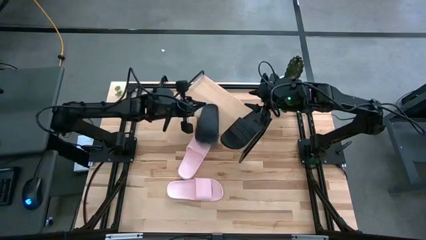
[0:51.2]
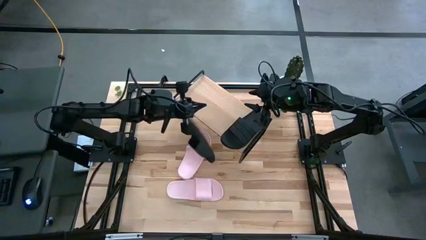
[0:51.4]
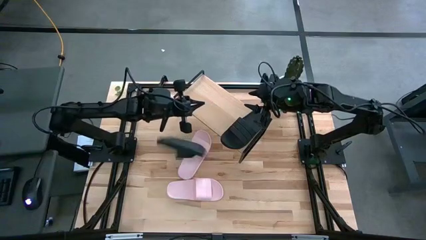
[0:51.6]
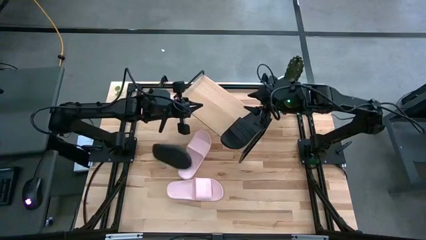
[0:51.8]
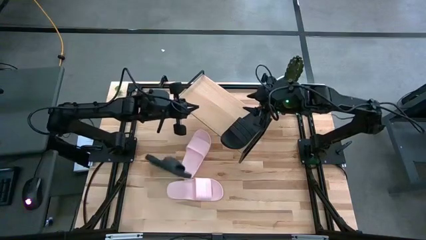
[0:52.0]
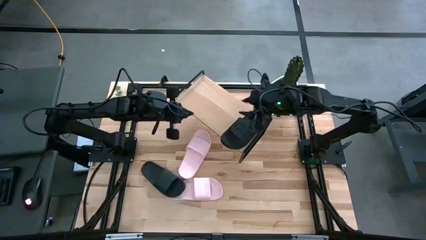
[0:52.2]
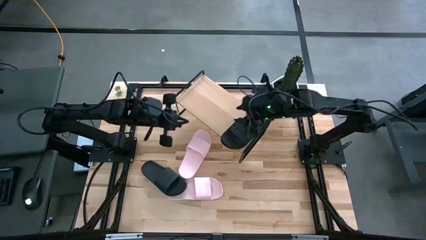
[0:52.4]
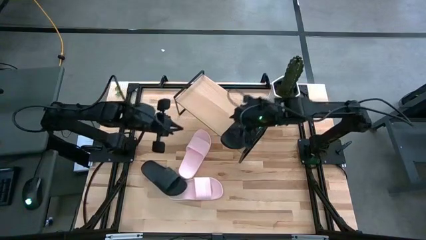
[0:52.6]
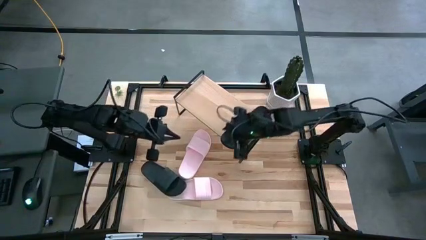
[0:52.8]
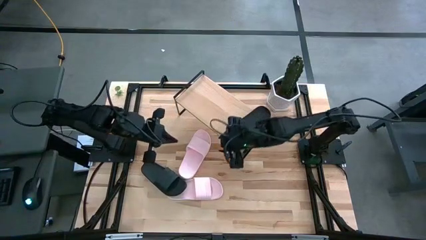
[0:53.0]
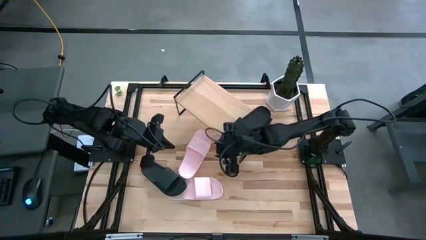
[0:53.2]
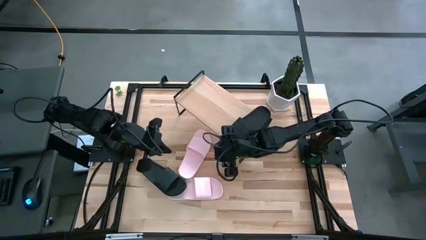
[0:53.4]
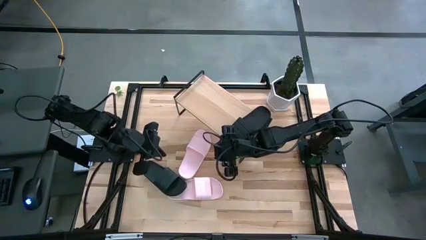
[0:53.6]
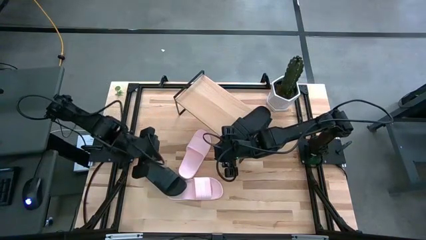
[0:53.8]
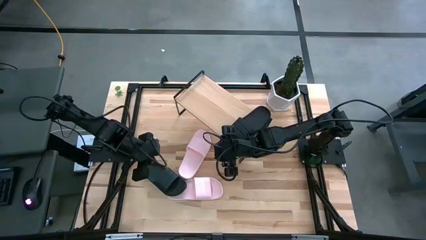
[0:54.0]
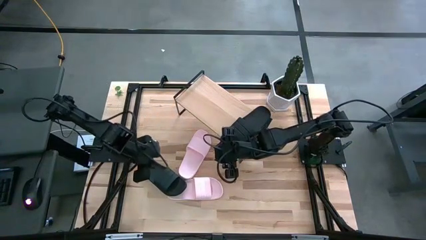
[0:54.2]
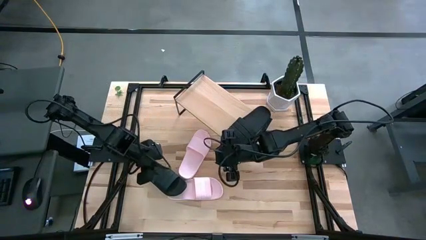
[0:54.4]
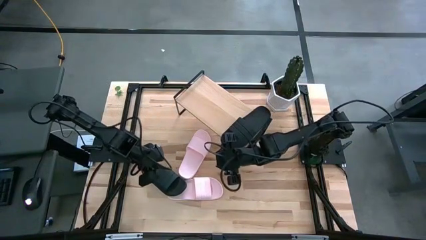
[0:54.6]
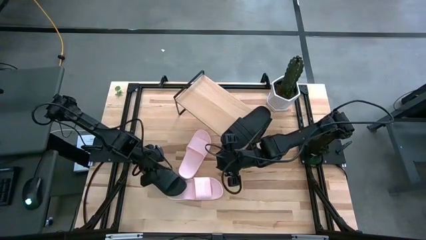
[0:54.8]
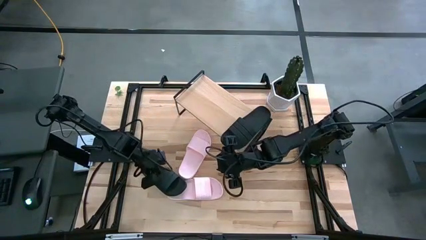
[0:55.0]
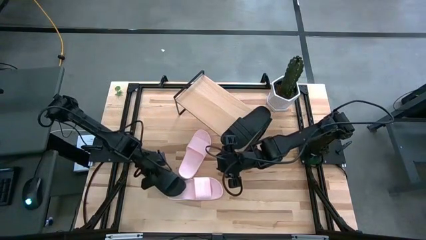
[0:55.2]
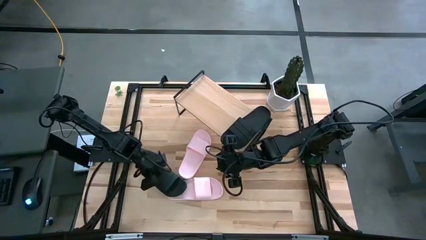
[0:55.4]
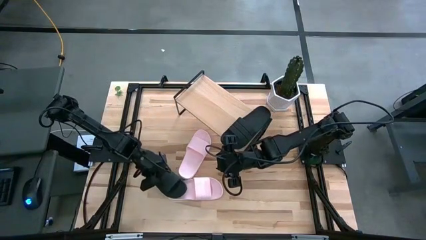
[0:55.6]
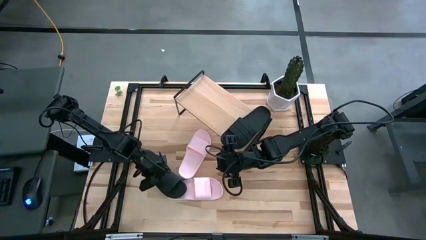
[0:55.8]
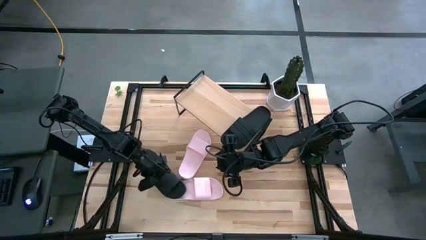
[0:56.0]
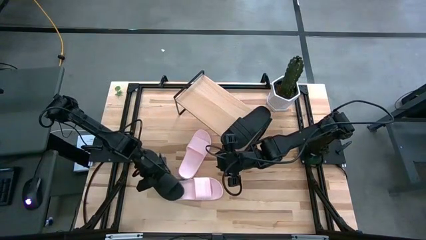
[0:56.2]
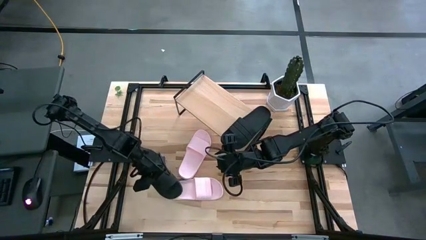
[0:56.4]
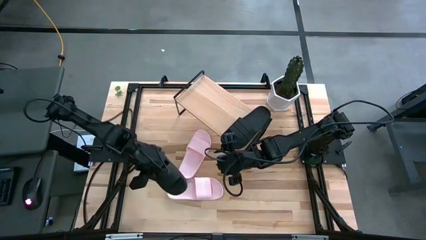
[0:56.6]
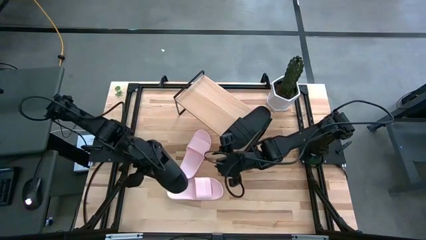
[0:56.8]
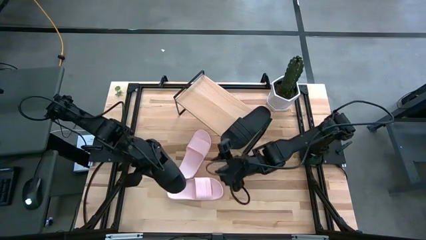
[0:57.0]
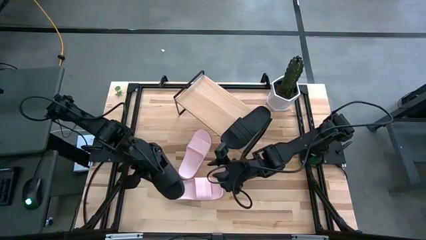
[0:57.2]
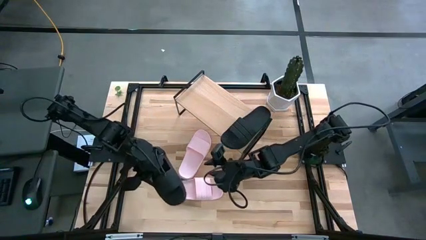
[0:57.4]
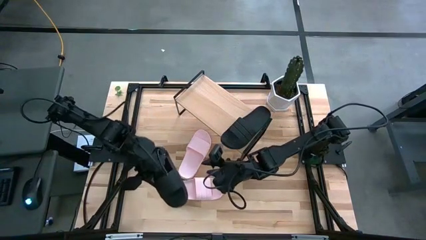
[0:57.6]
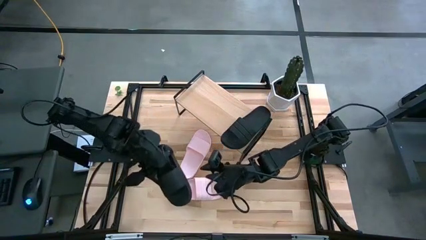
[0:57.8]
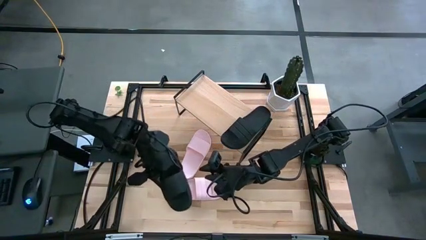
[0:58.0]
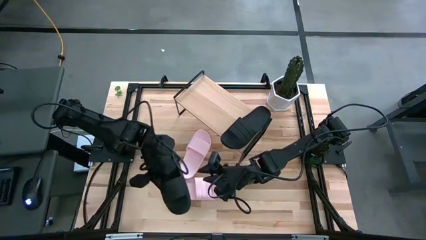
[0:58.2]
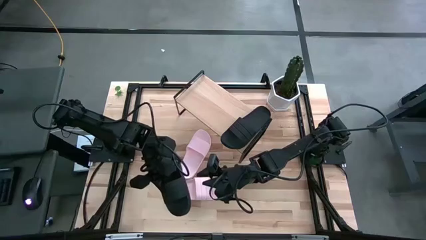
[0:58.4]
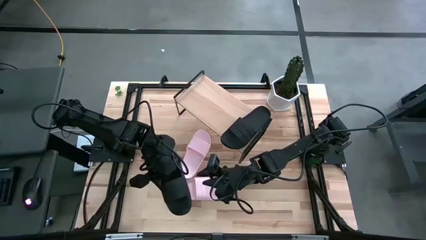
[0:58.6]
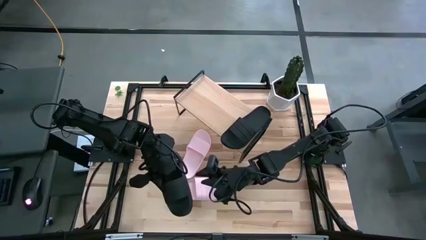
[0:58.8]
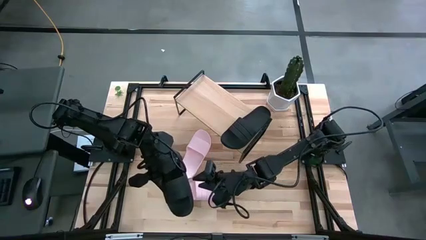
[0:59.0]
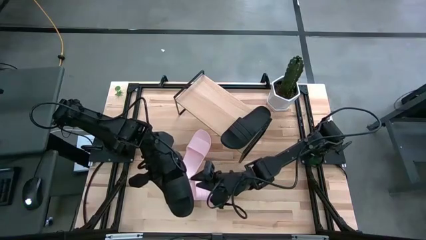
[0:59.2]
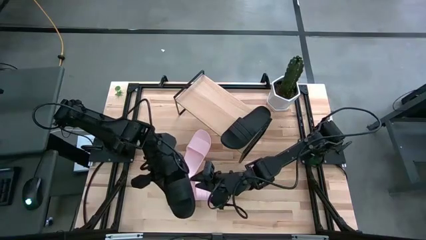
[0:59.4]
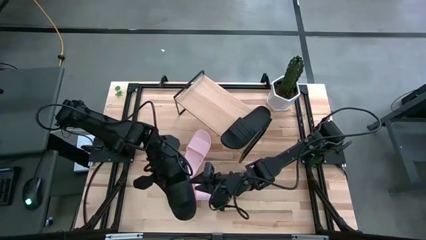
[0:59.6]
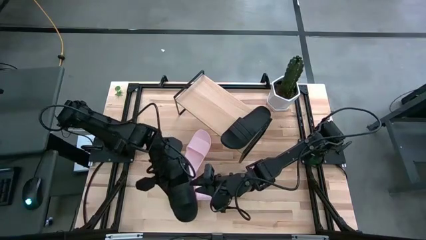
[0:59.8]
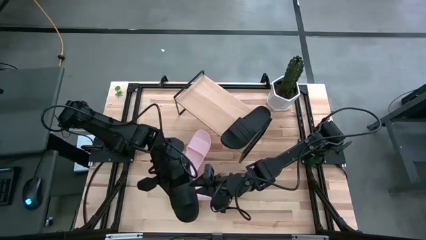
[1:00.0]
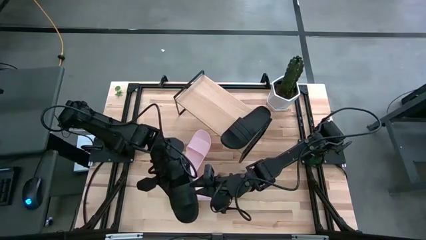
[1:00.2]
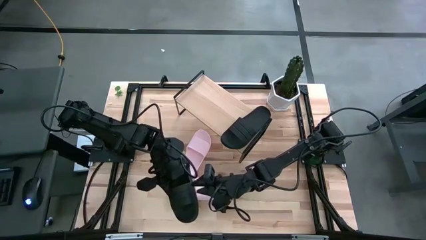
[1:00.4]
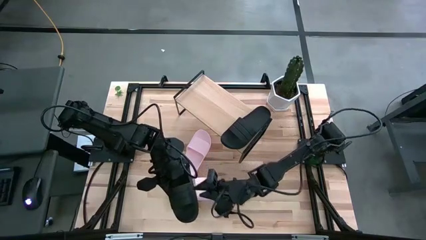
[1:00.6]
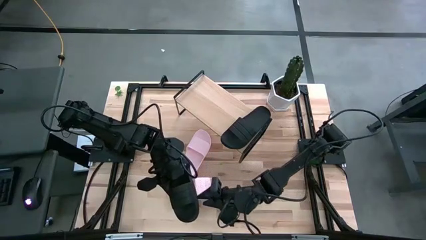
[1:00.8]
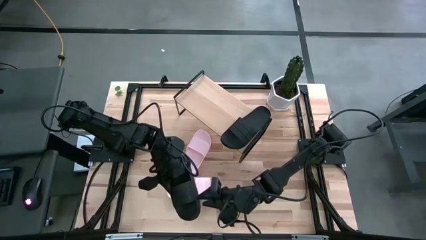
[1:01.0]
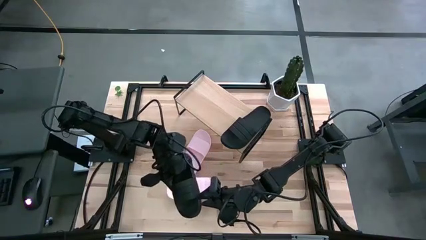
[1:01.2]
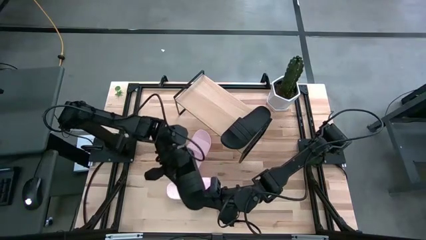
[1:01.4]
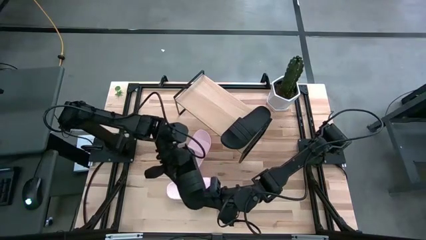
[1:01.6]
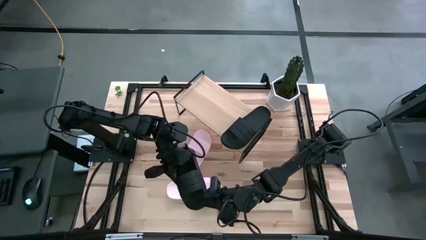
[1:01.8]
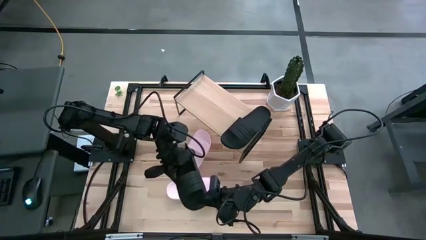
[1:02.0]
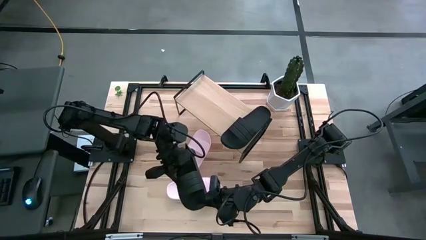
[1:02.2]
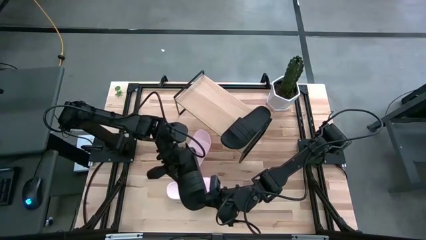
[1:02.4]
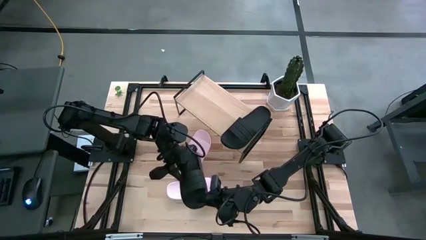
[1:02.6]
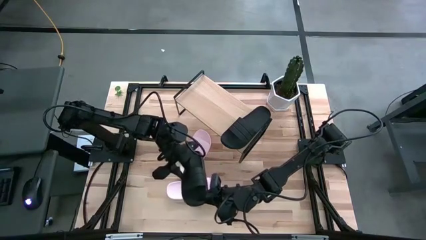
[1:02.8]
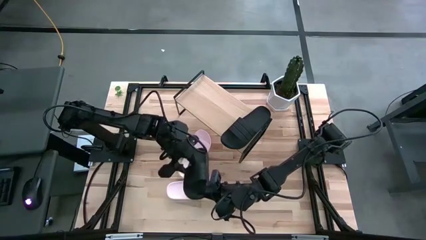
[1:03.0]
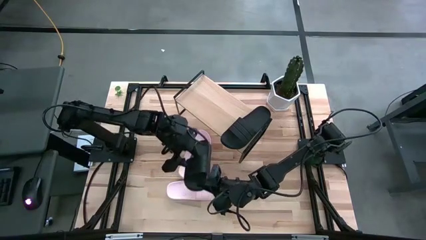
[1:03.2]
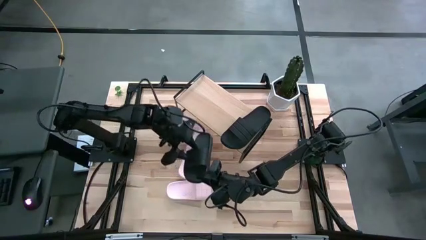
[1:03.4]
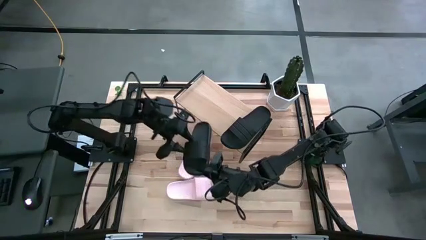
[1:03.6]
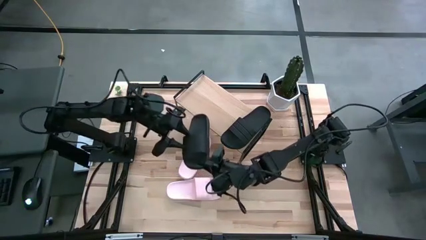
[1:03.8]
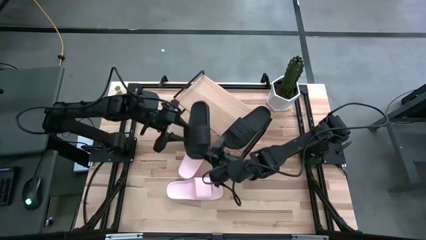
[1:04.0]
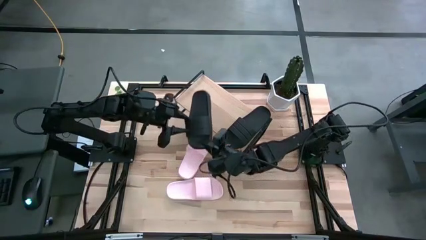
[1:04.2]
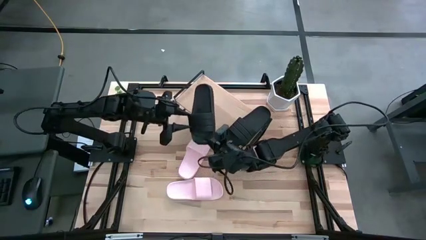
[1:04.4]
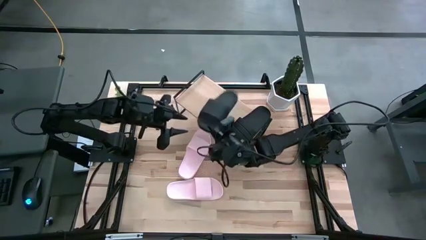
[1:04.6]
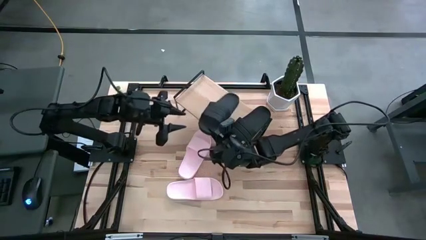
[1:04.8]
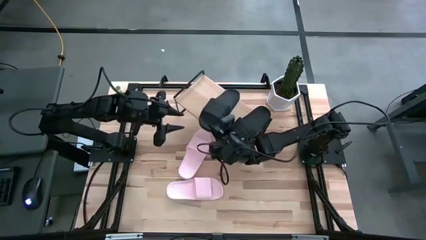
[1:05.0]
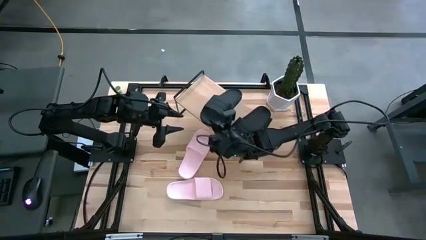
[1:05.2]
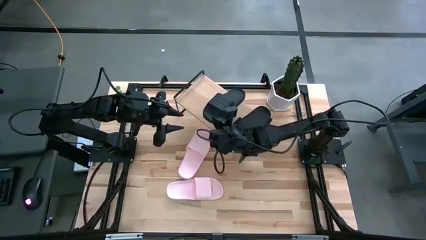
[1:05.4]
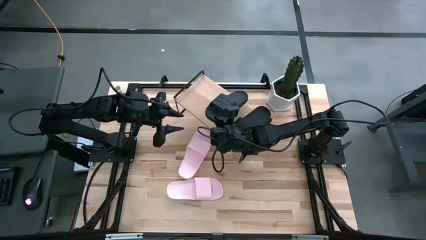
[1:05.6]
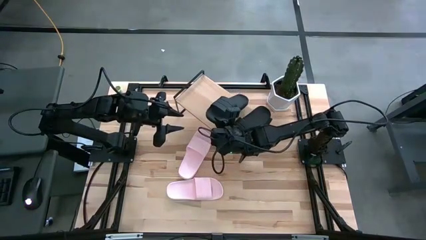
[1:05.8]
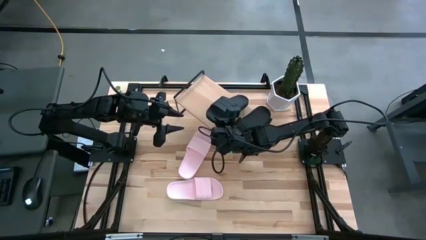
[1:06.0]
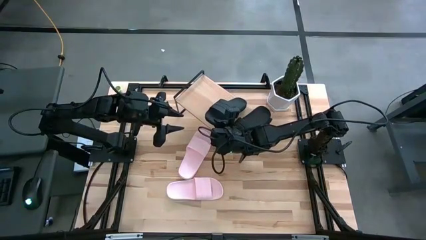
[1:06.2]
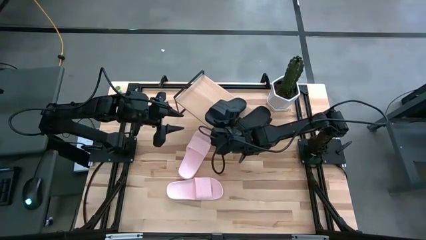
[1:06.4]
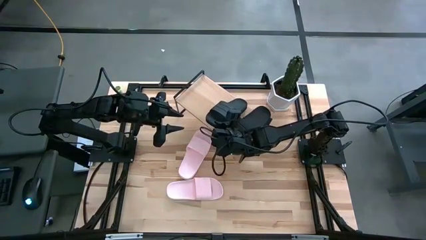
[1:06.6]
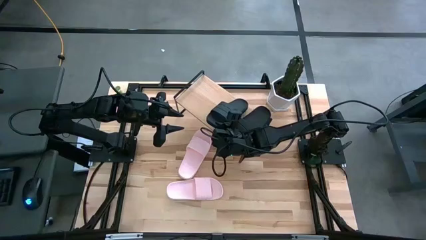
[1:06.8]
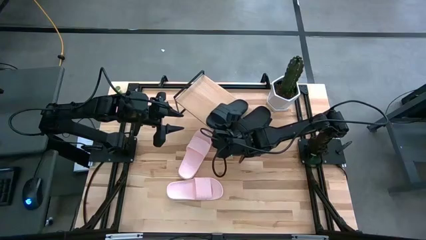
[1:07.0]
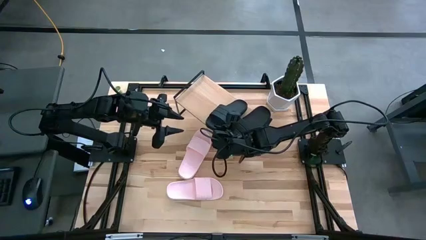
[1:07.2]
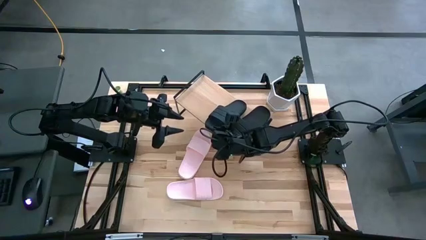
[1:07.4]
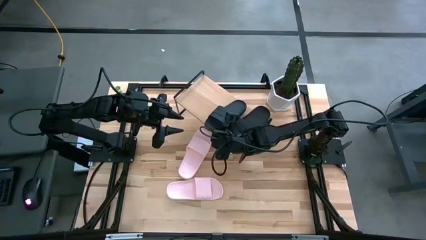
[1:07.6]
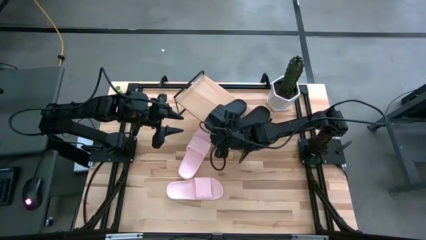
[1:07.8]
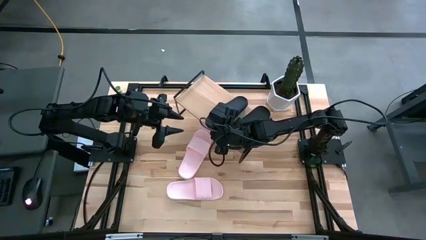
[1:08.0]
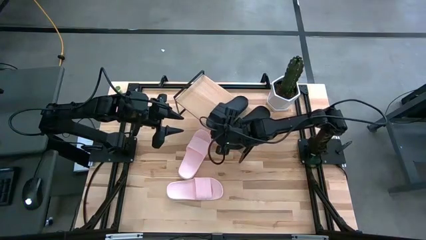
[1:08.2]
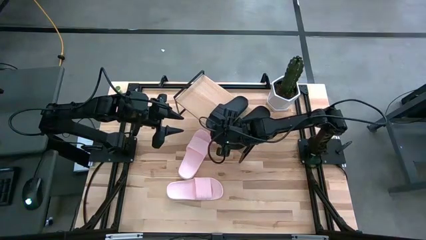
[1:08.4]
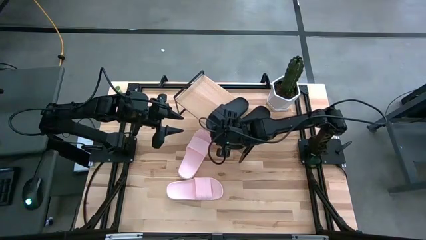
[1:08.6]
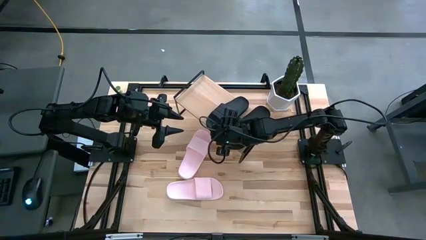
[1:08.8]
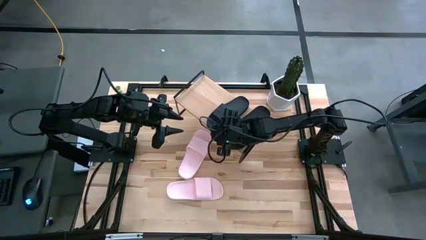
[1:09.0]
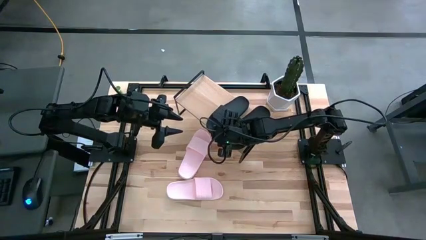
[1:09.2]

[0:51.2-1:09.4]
Task: Pick and place slides into the shelf
Put the black slipper on the shelf
